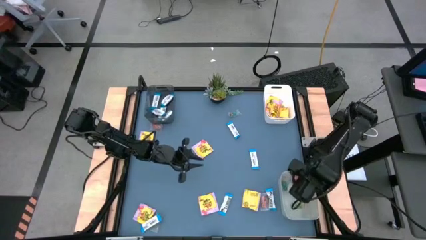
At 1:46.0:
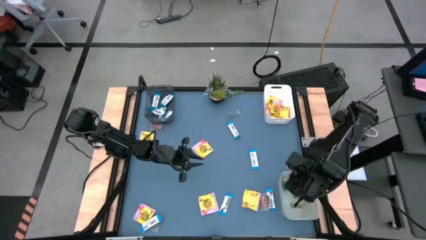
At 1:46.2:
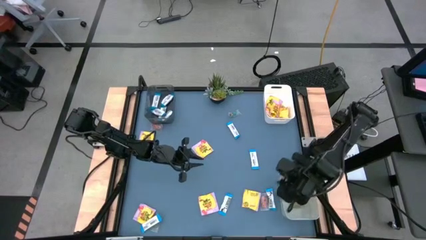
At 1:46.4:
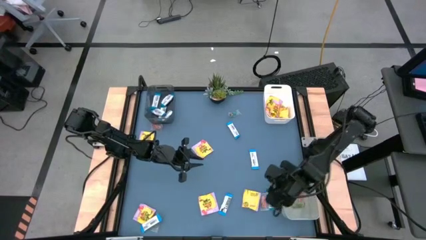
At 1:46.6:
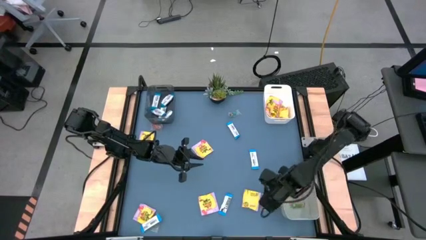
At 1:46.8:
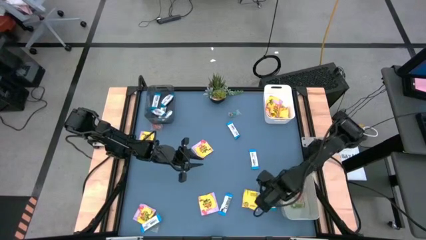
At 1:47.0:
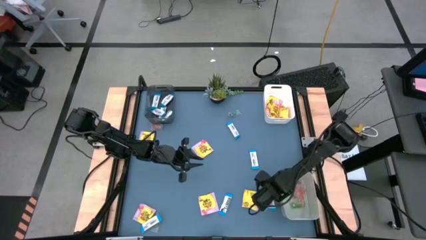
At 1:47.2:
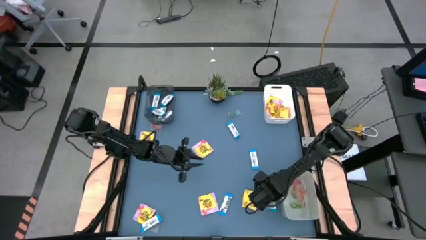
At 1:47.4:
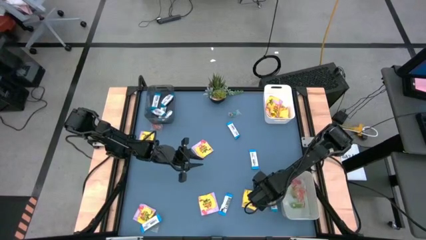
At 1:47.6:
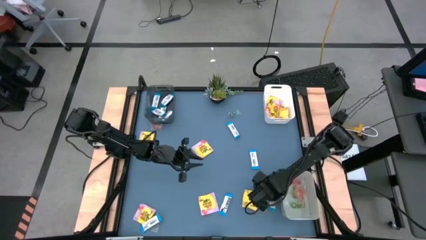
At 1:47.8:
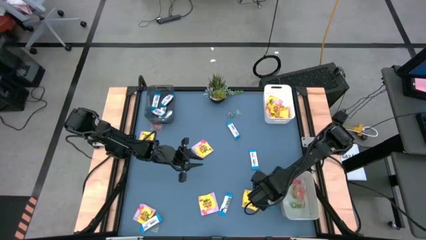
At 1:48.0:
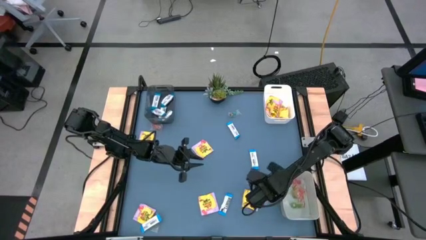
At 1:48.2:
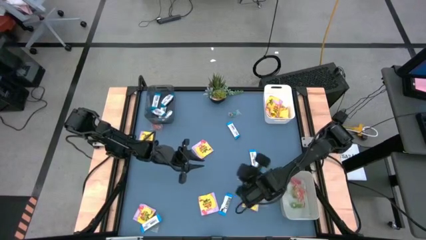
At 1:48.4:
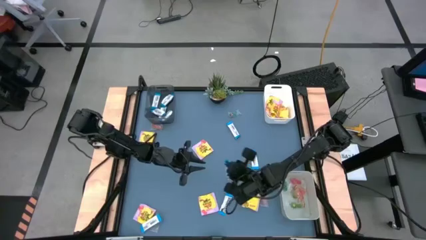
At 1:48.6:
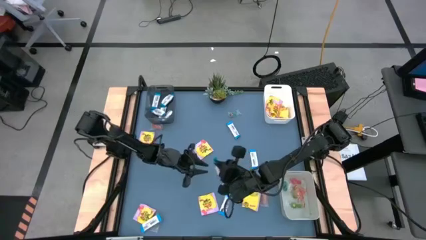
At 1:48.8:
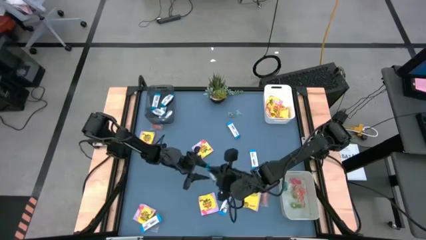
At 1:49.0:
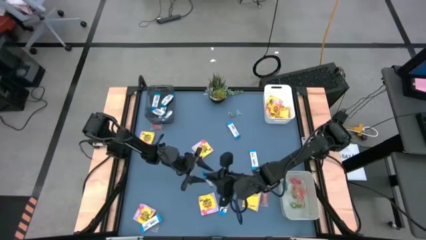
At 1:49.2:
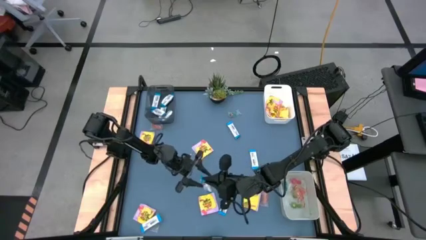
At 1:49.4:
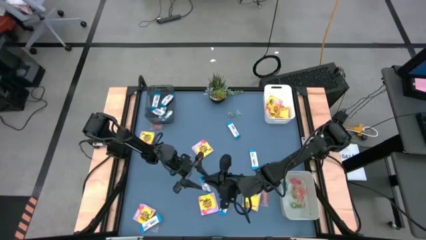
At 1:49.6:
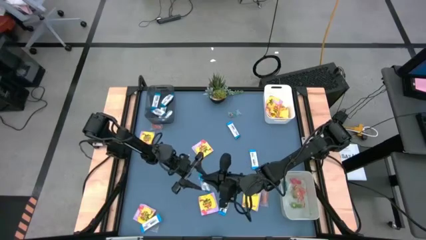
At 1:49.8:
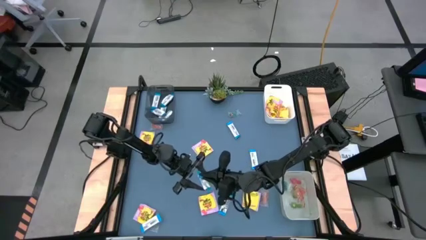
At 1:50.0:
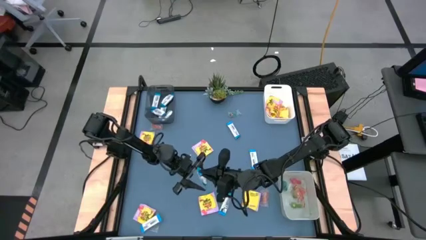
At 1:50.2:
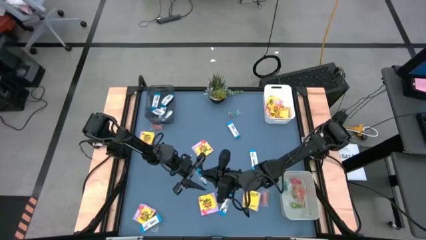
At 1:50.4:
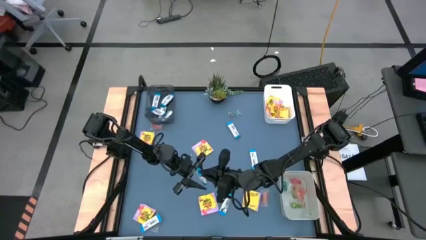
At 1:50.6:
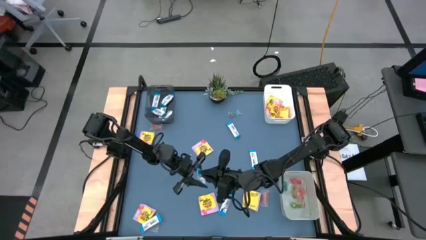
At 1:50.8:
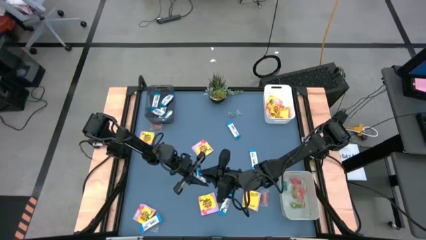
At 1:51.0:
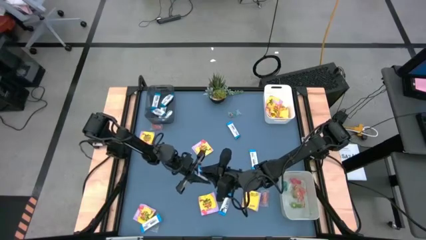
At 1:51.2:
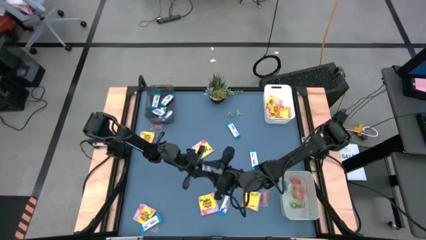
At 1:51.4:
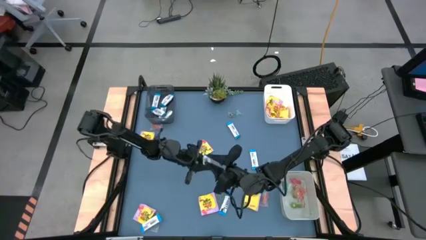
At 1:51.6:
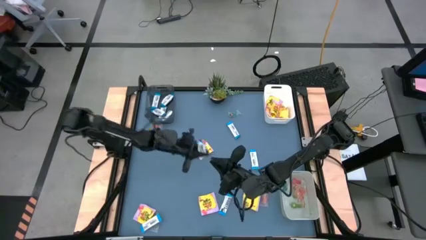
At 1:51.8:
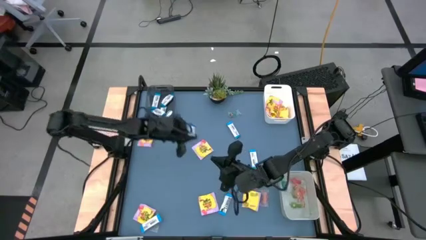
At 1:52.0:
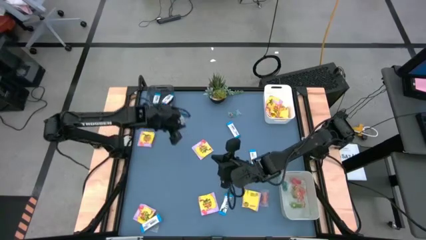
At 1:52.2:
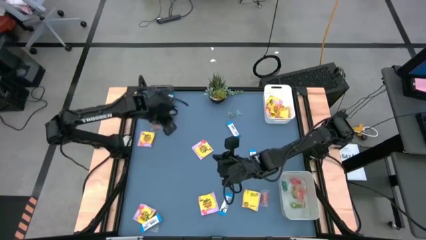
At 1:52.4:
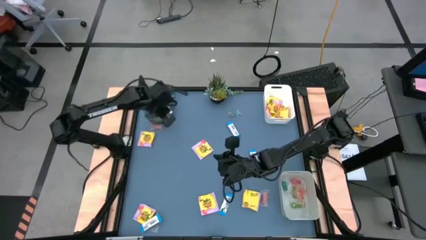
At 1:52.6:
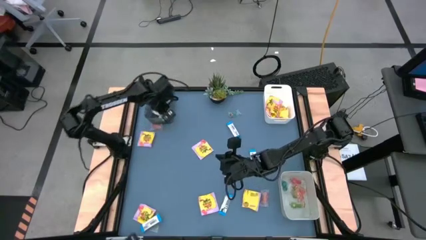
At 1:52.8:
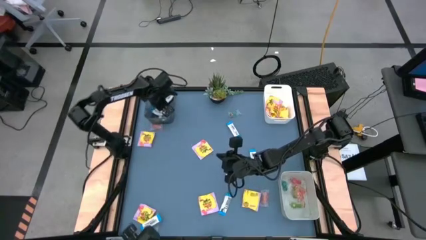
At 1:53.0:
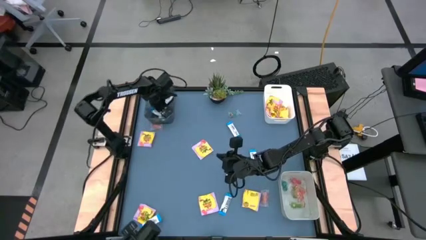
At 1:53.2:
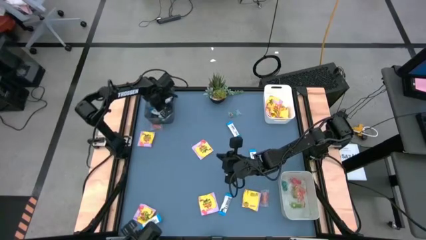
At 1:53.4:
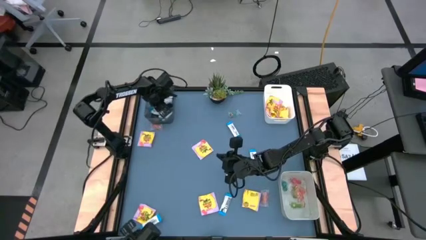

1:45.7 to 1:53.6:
Task: Sort candy
Put the bottom right white chocolate bar into the transparent black bin

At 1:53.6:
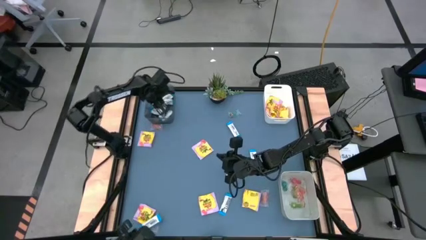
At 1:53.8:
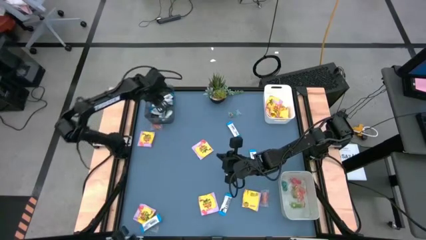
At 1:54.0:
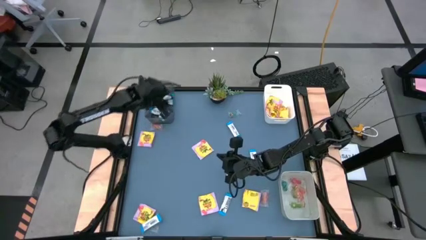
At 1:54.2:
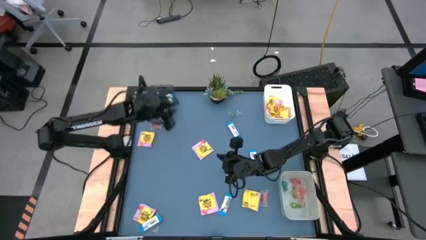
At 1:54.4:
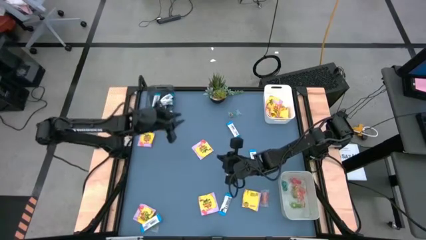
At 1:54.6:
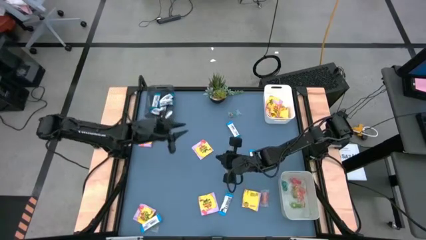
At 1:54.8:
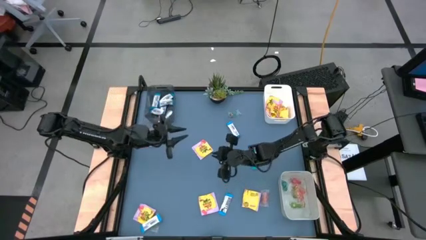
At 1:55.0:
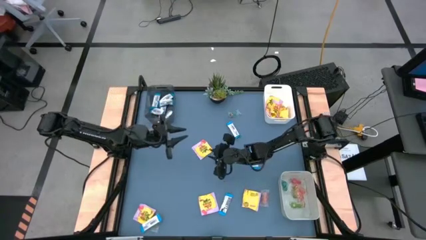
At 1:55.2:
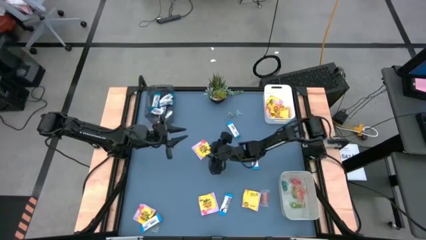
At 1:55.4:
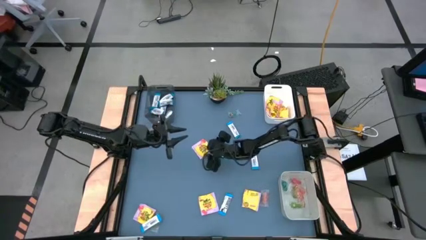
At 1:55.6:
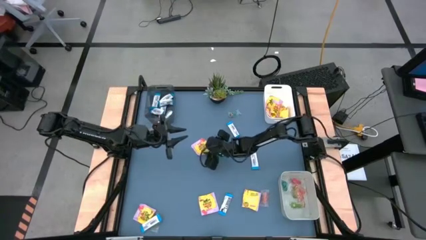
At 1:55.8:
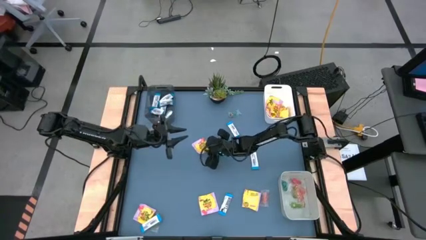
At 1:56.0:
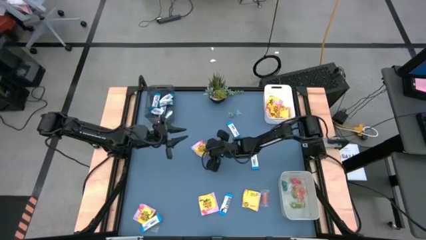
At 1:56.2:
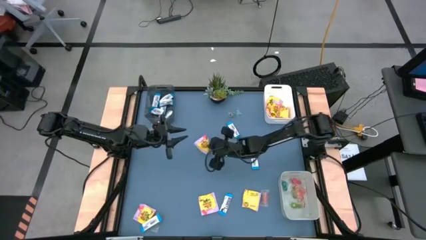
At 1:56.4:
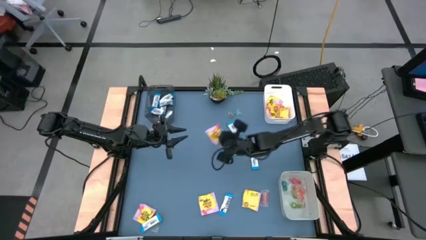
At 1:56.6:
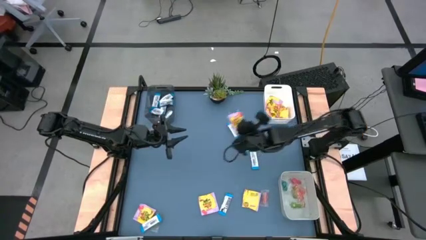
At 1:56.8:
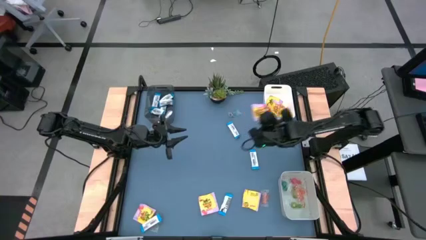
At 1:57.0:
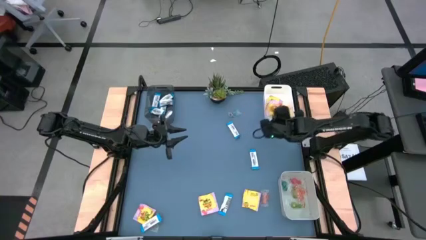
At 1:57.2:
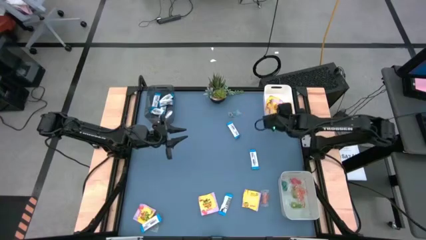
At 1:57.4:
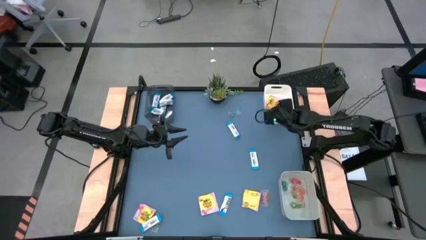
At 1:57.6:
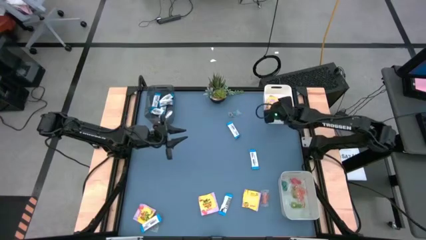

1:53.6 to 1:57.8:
Put the middle yellow candy pack into the white bin

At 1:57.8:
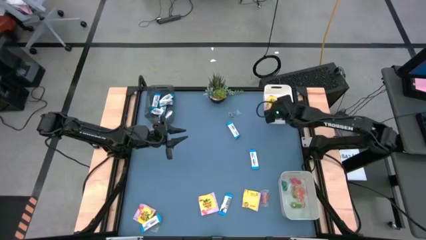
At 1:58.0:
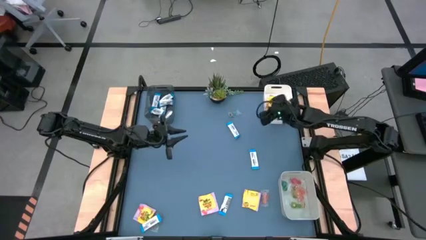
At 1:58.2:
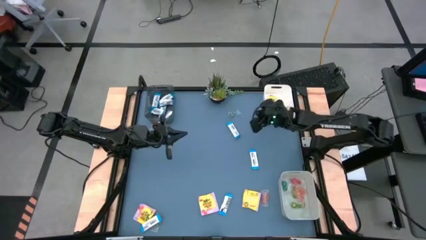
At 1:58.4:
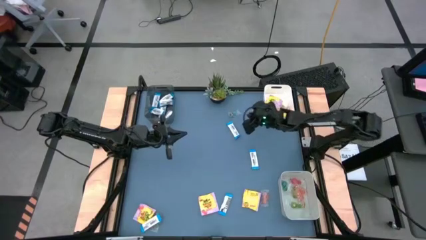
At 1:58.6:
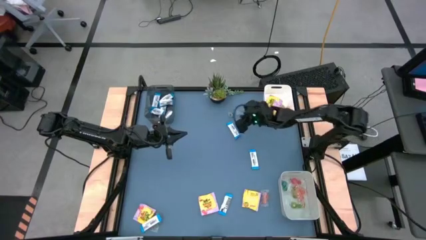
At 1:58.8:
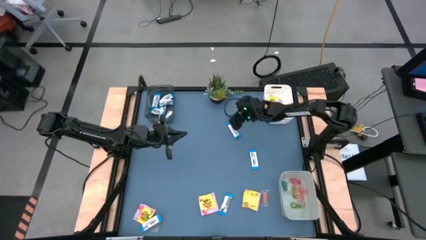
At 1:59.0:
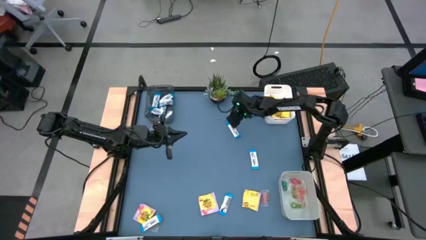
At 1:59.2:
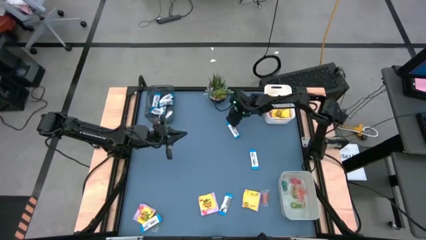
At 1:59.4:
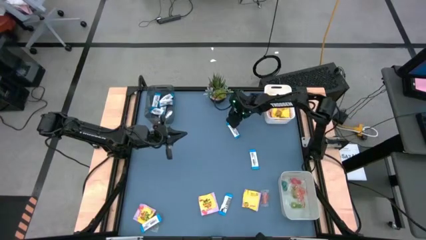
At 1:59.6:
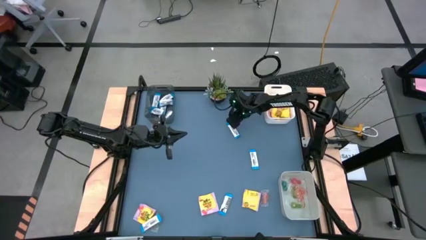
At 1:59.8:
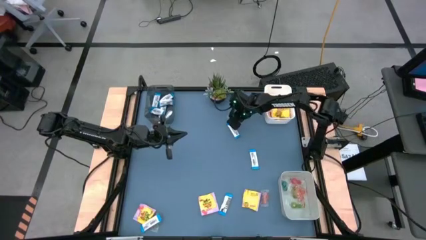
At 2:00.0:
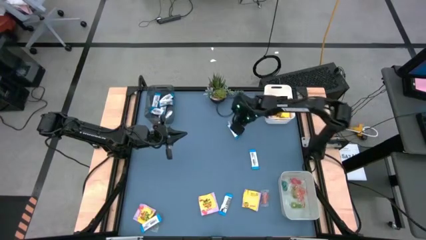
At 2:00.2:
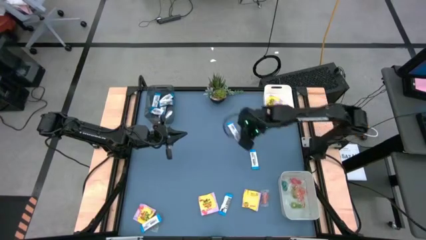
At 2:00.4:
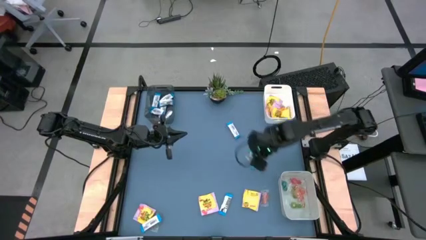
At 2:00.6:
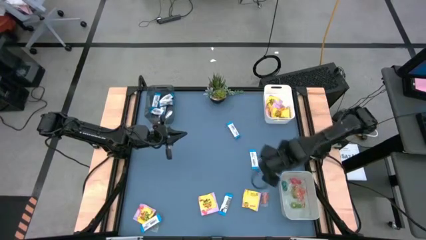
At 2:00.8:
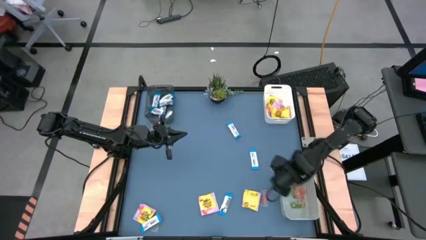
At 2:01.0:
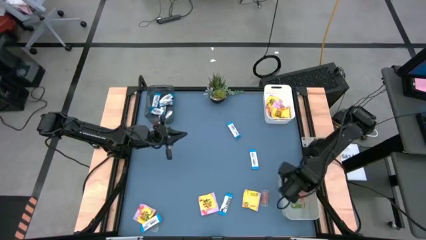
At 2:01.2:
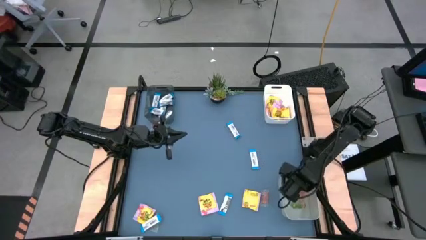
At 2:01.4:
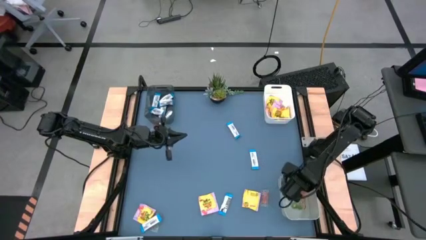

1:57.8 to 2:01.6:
Put the top blue gummy candy into the grey bin

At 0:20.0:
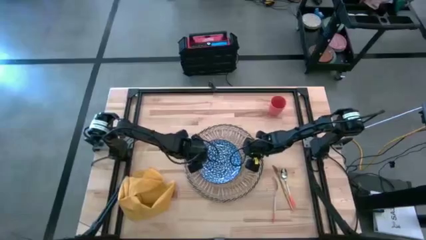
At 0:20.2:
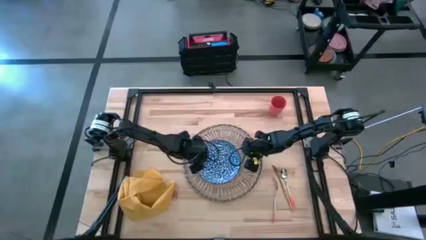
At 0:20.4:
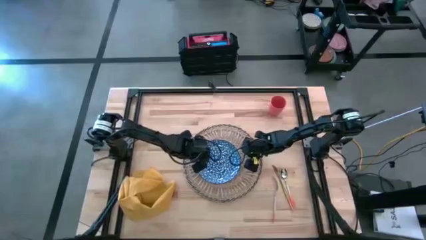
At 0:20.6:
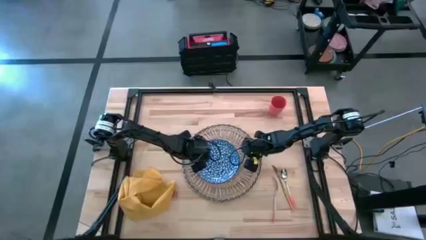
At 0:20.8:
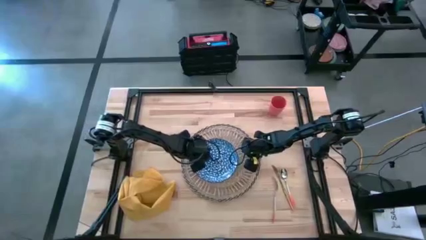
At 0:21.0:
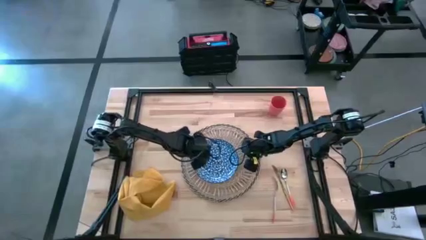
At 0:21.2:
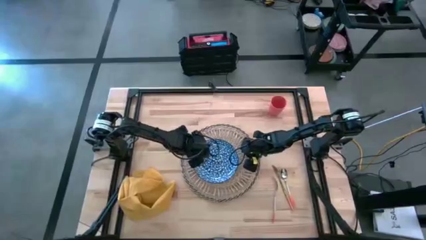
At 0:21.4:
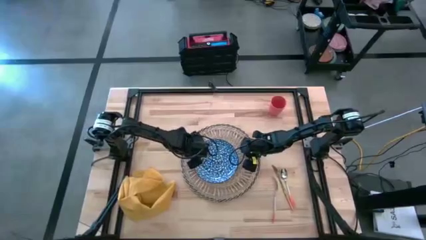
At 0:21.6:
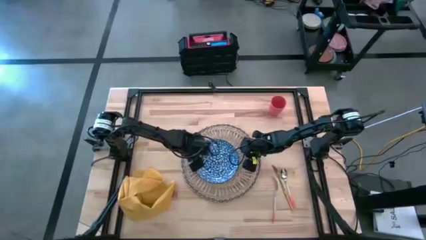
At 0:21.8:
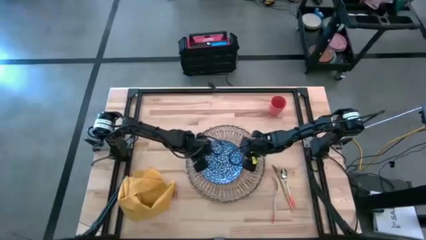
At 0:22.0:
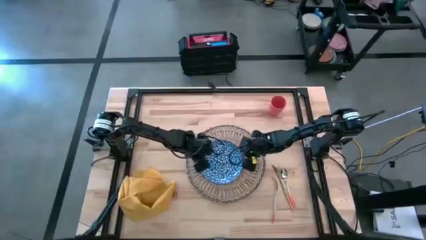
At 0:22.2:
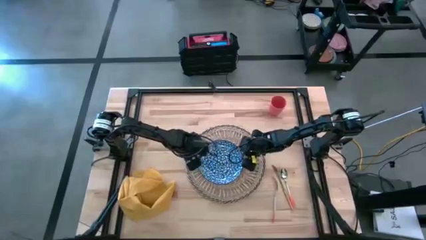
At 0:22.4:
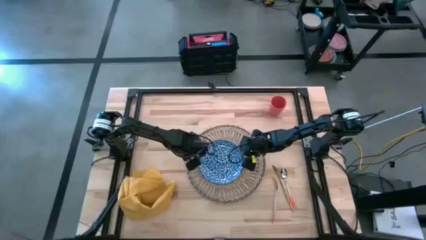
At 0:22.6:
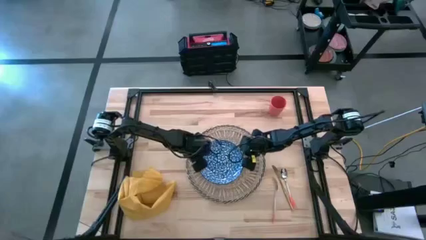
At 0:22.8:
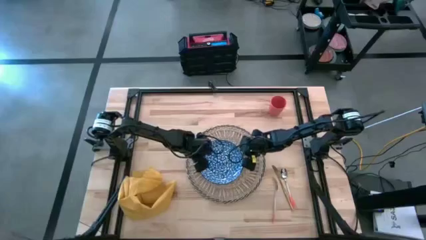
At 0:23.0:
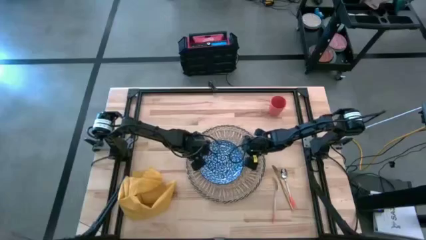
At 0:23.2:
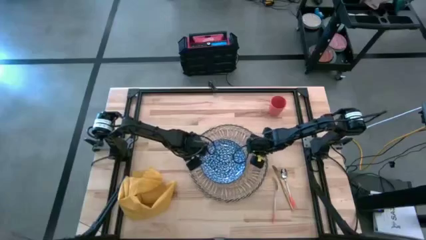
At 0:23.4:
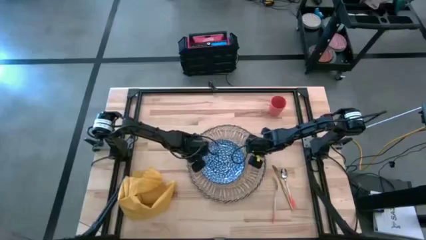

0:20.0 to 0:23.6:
Task: Set table place
Adjust the blue plate on the brown placemat
